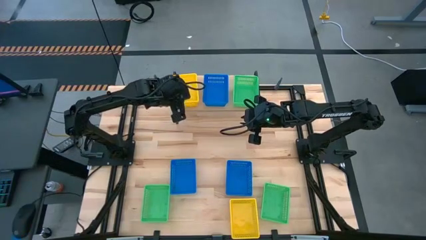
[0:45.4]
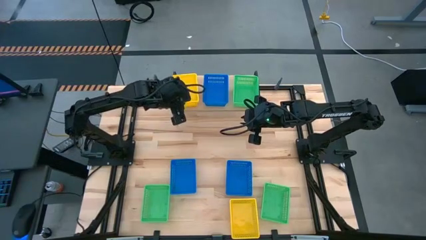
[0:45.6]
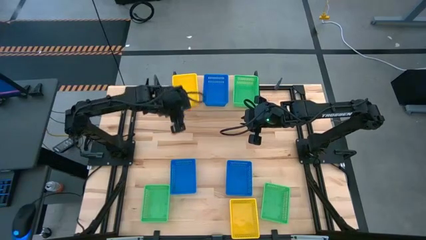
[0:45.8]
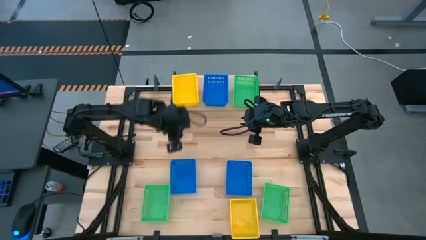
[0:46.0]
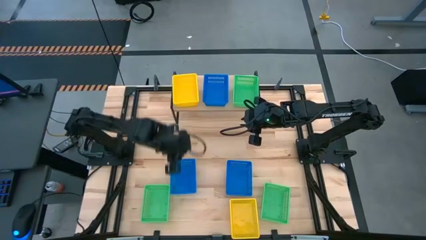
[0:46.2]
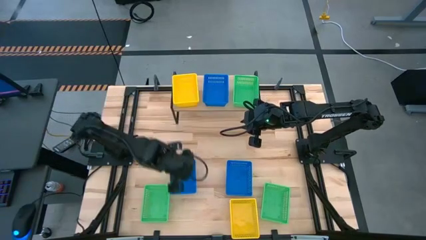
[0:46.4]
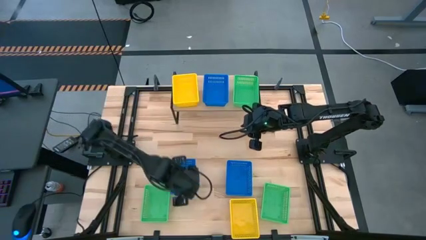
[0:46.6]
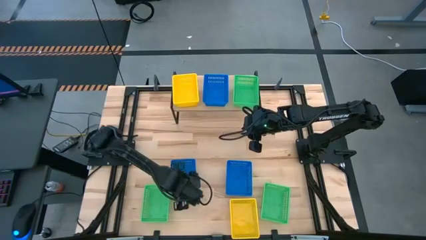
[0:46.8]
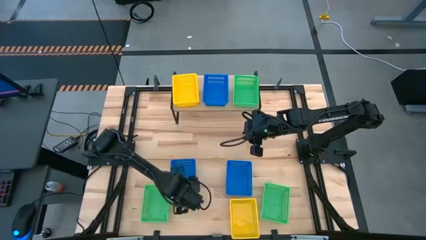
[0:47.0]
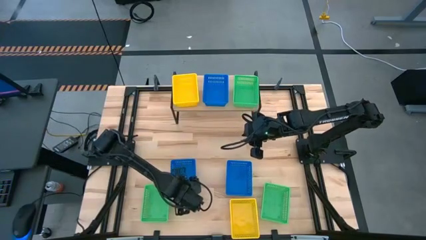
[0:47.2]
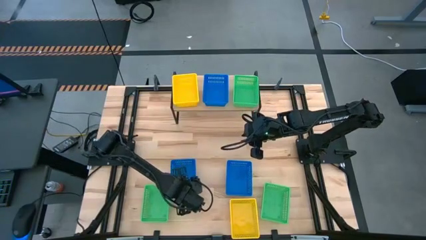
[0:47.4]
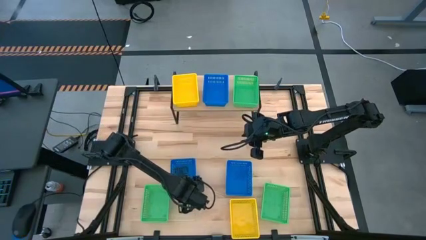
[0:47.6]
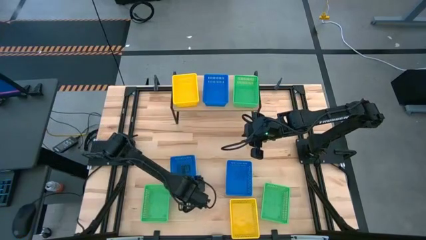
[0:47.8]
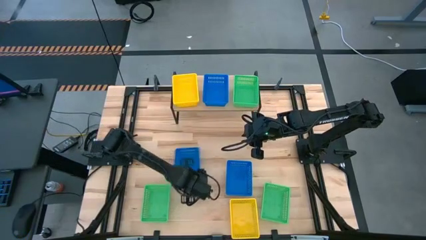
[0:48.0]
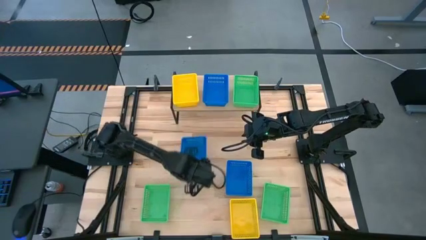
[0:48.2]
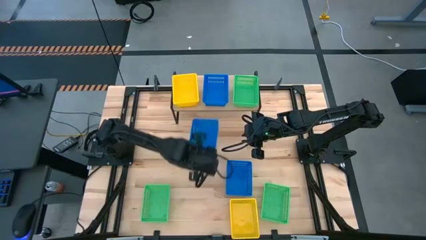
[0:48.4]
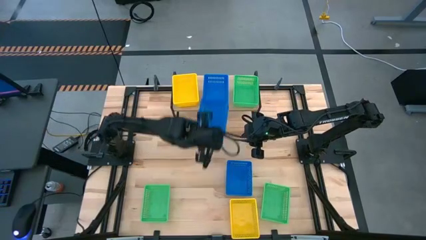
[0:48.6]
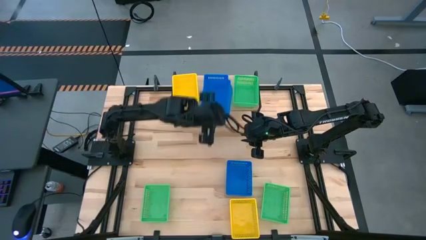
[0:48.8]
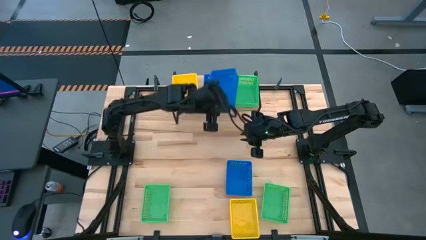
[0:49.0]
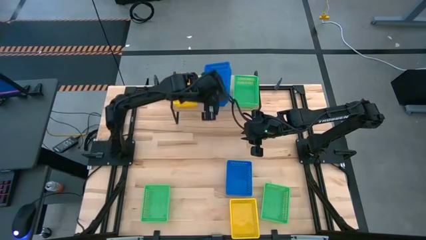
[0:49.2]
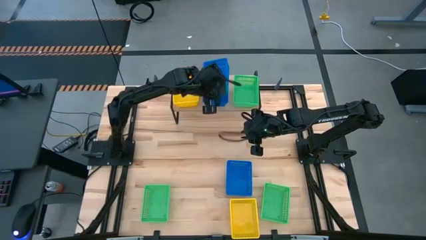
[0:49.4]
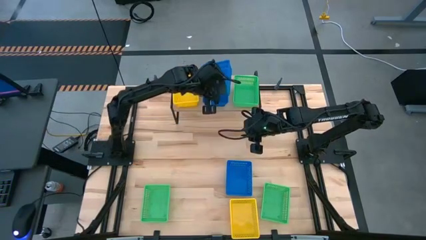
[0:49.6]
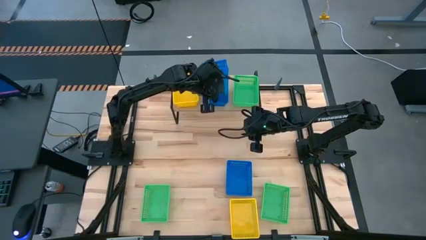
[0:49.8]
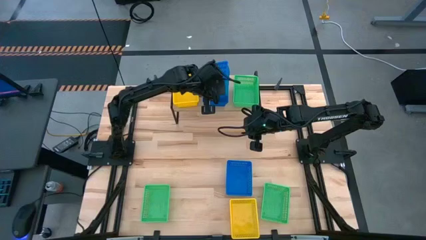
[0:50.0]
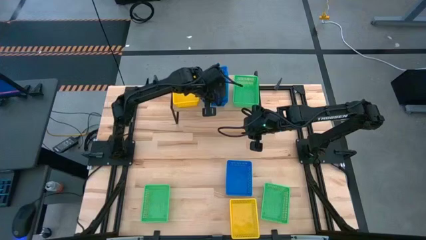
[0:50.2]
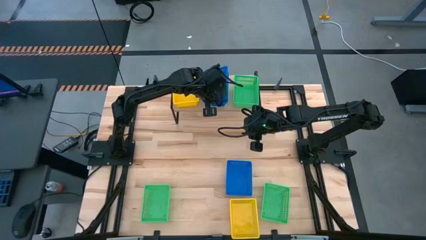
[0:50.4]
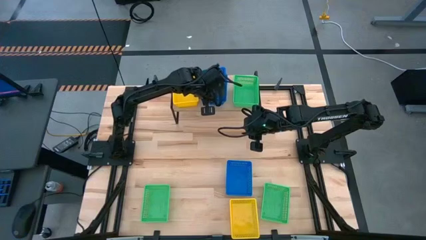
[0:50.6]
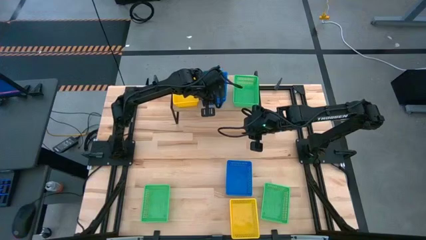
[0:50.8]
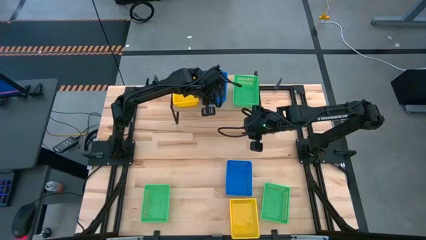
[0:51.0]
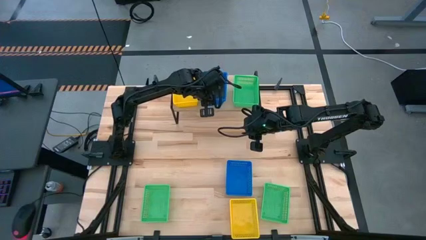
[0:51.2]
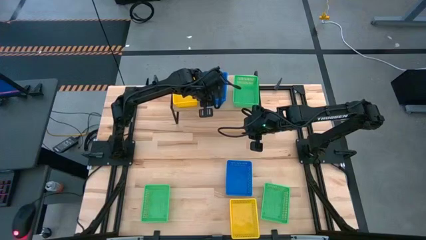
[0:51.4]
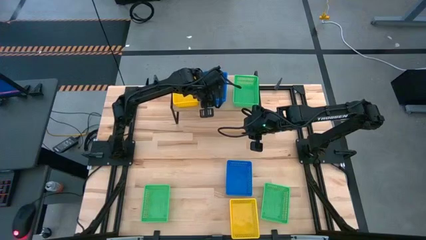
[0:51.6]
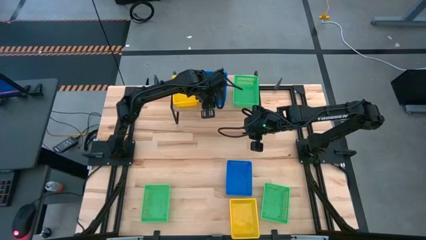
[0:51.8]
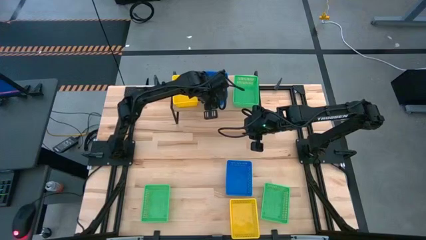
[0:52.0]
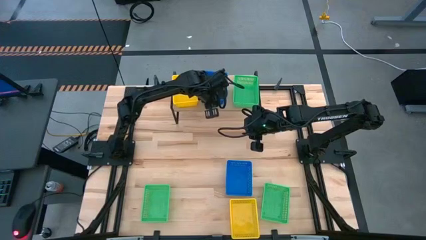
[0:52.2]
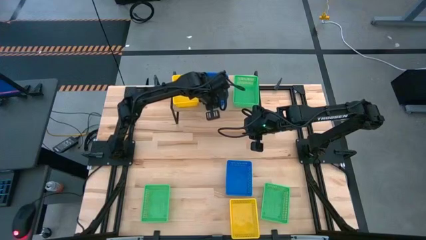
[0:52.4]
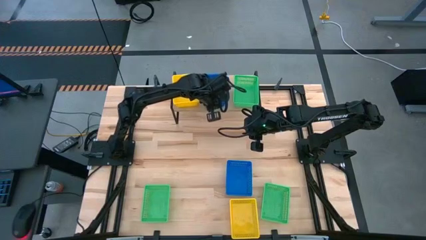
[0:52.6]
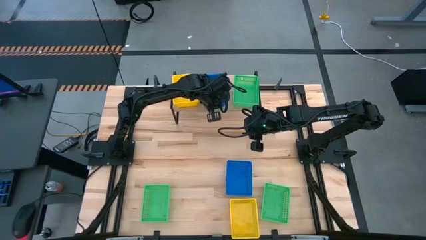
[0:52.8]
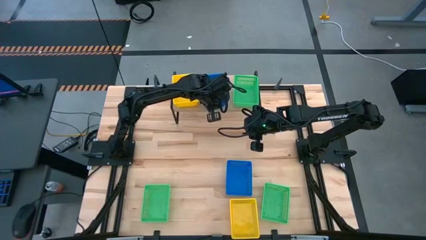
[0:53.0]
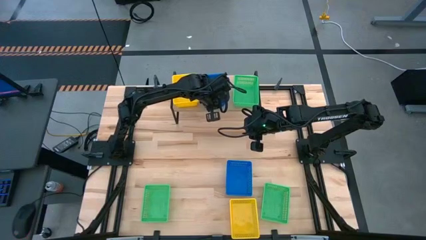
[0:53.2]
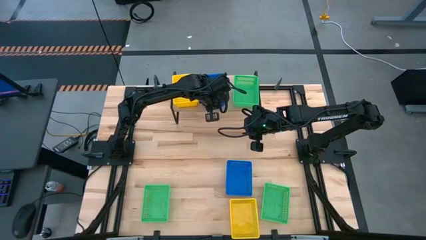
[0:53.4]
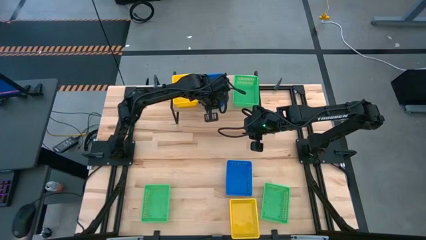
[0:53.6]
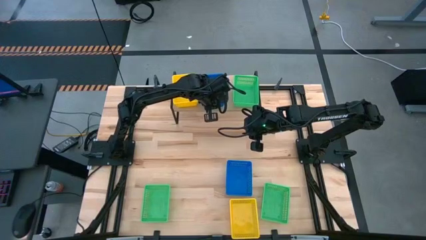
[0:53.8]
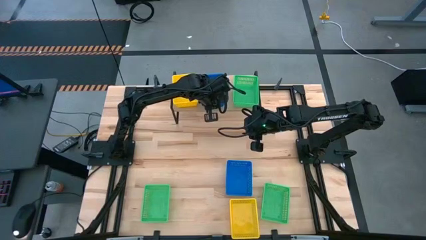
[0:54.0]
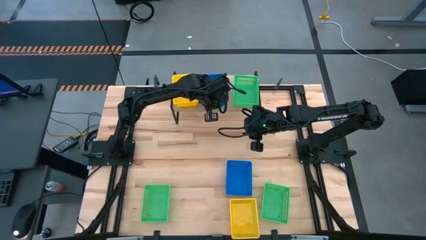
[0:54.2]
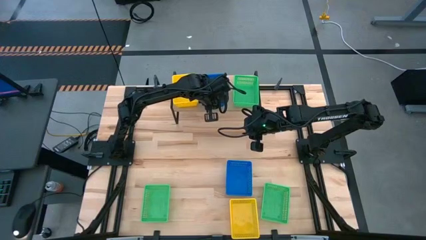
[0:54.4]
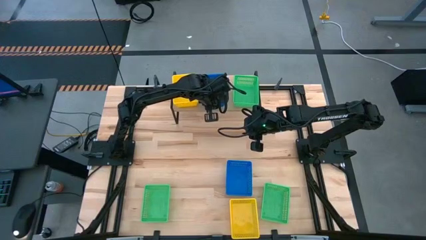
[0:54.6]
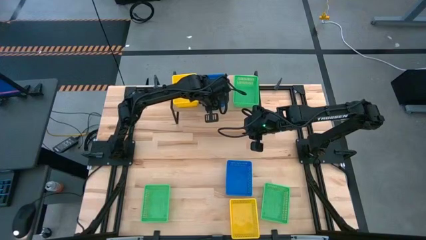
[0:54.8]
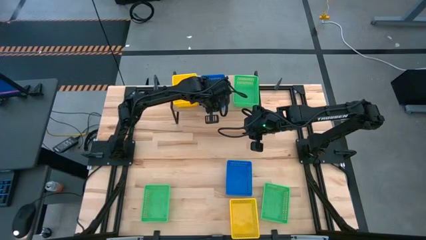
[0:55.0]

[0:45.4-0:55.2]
Task: Stack baskets on shelf by color
Stack the left blue basket on the other blue basket on the shelf

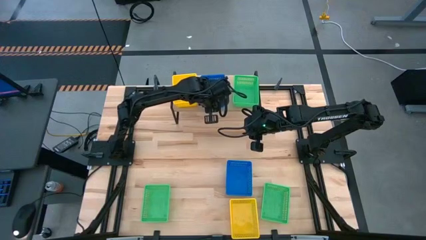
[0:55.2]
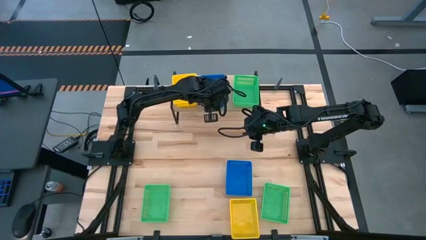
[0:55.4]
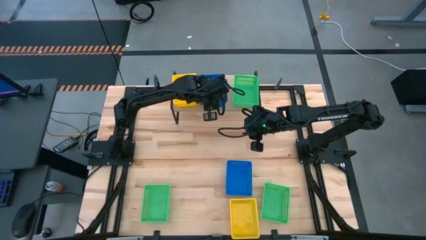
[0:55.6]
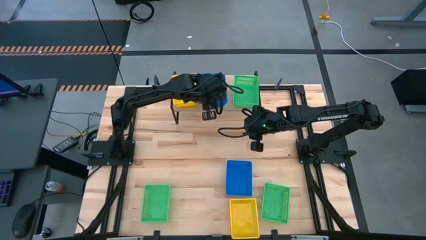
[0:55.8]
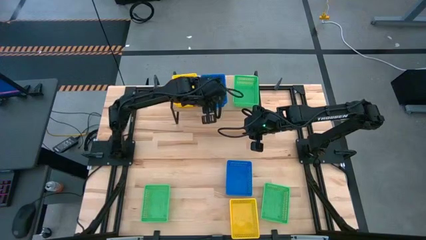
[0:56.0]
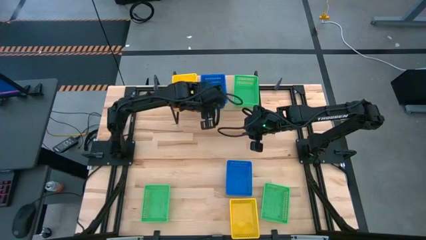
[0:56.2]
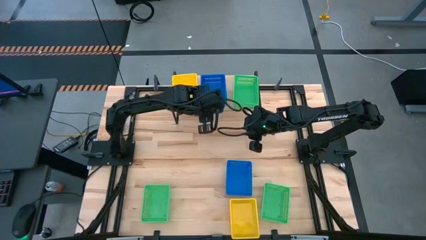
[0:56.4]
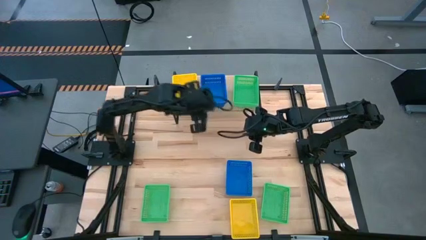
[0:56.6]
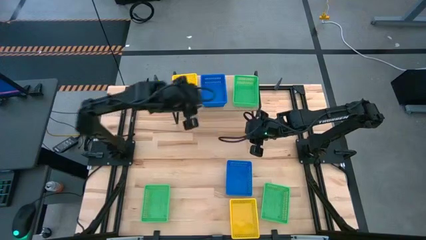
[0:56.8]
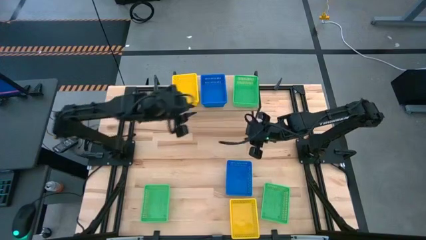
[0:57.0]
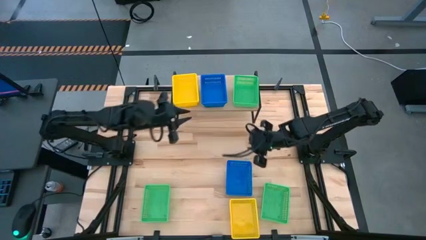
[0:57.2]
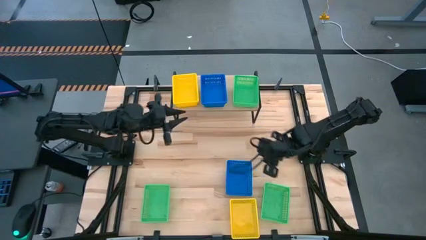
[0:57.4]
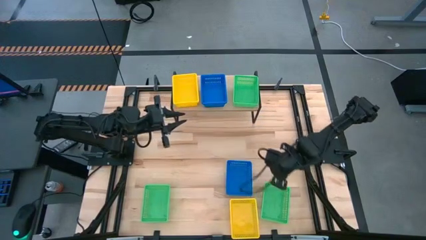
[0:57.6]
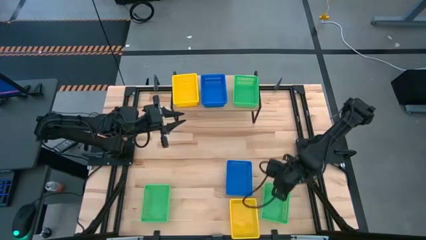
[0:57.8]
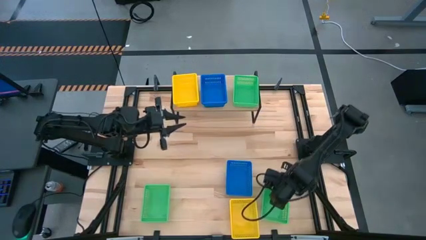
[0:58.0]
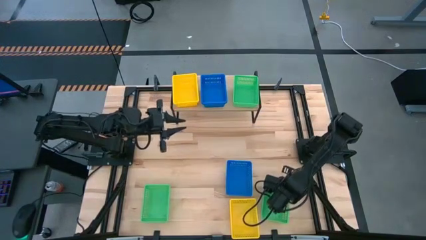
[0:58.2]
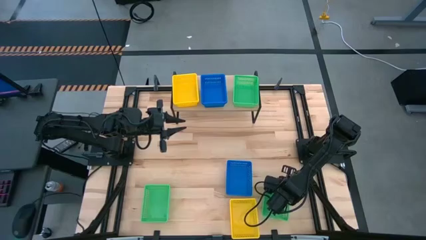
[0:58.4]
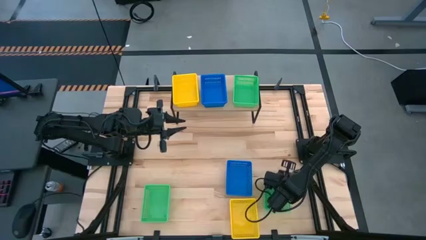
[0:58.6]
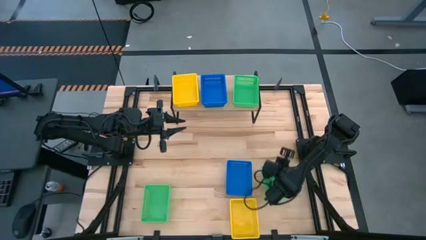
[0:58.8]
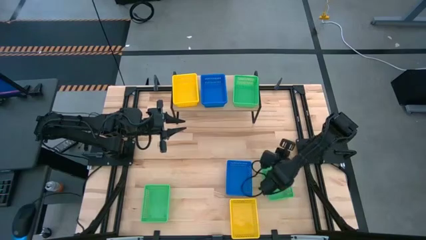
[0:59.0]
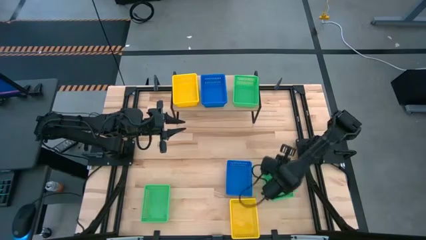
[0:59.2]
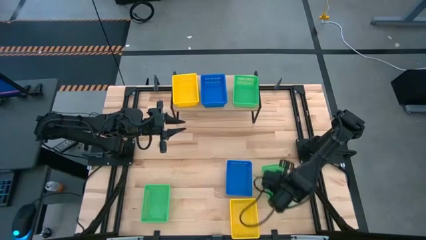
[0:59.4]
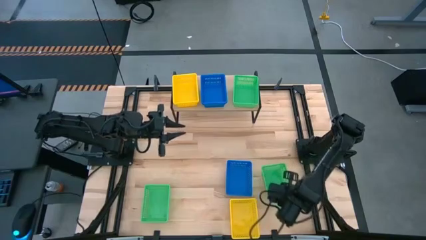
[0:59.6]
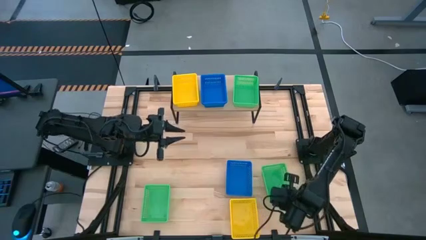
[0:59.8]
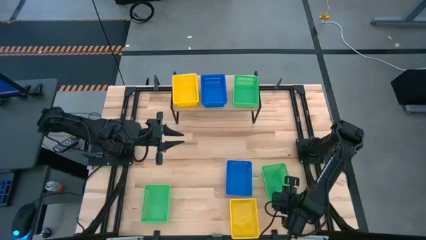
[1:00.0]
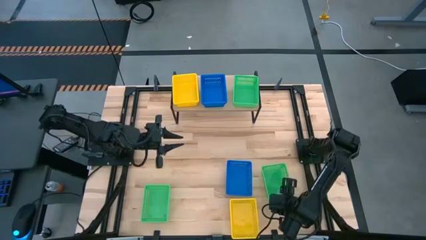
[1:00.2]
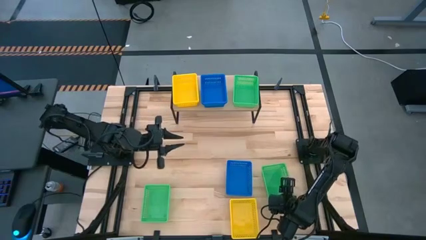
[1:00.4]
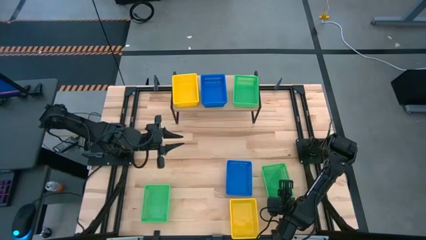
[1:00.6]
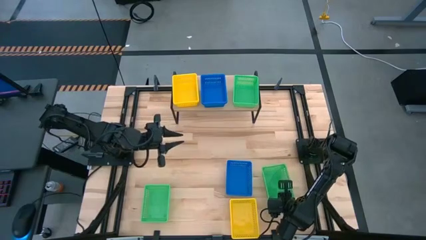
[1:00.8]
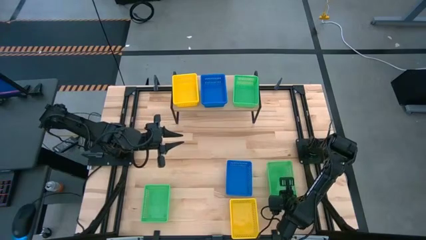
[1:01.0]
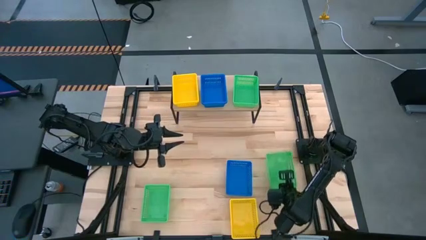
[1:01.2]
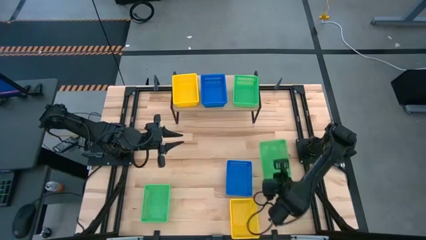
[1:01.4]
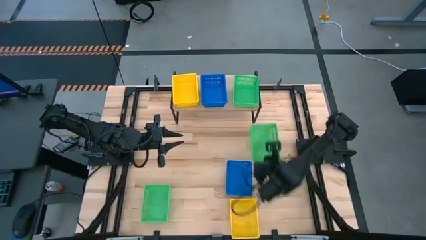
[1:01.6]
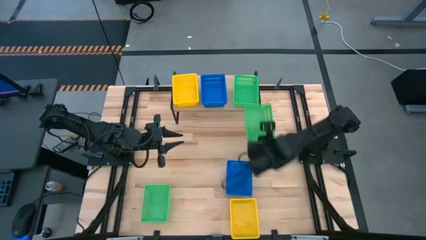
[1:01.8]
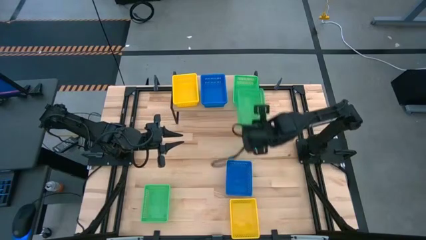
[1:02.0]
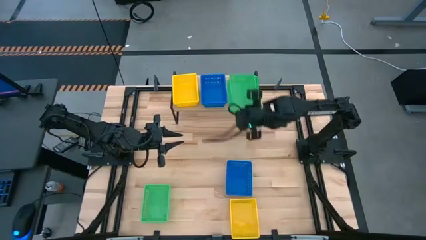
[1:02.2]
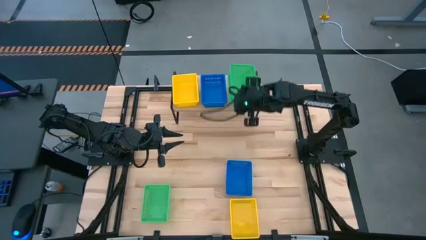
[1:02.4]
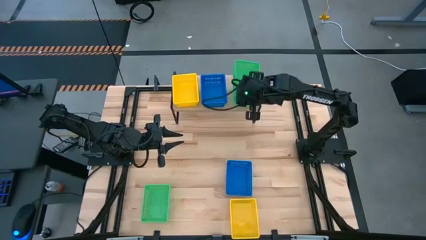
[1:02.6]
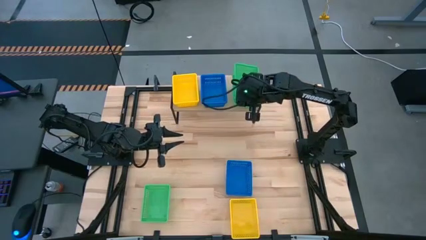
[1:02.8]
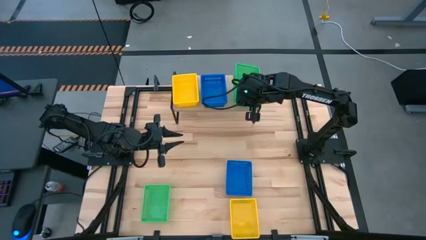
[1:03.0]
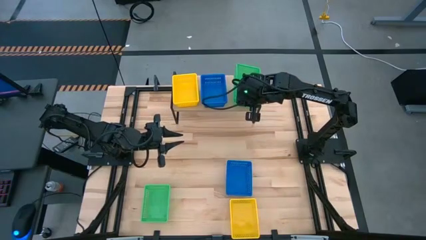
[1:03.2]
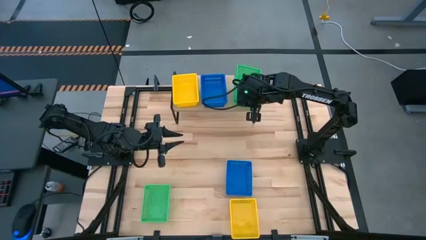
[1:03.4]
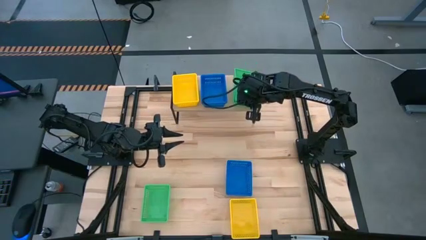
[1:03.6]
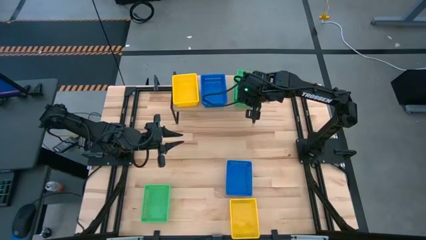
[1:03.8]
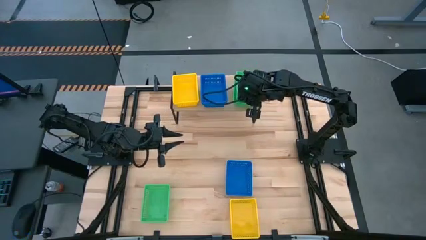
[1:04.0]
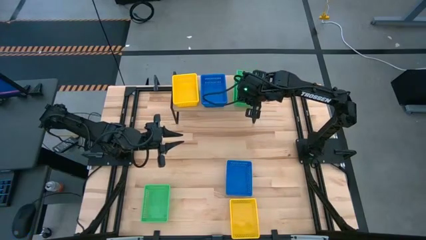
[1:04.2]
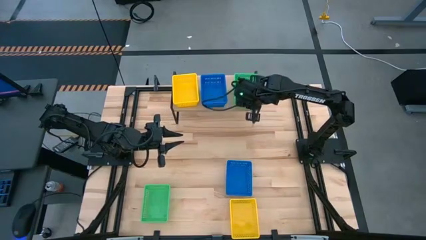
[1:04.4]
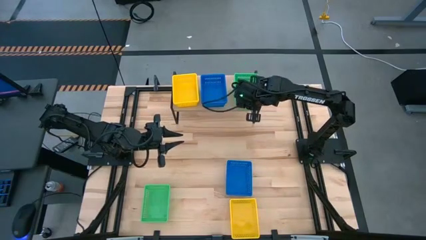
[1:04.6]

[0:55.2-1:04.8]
Stack the right green basket on the other green basket on the shelf
